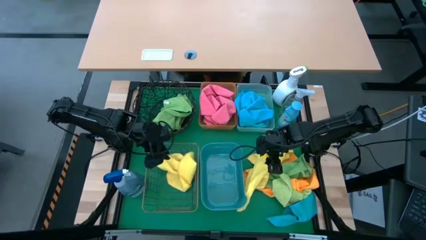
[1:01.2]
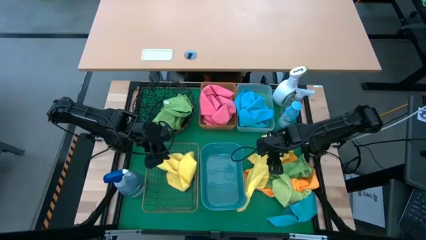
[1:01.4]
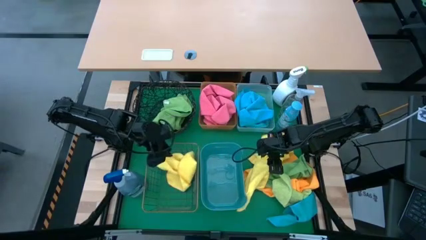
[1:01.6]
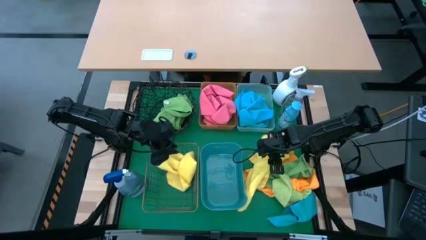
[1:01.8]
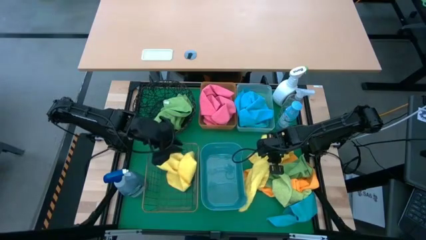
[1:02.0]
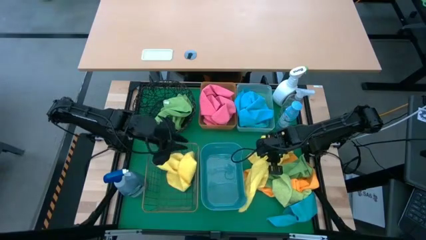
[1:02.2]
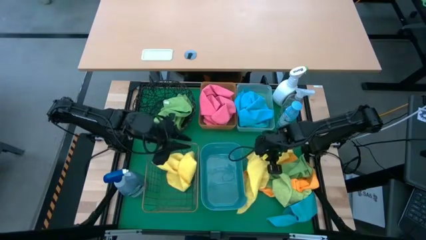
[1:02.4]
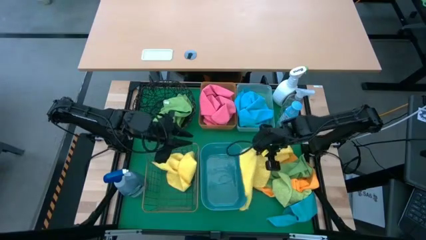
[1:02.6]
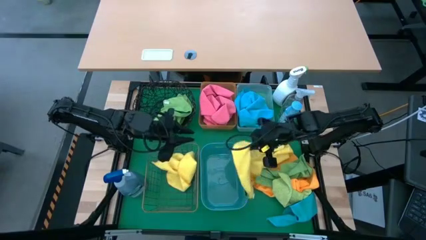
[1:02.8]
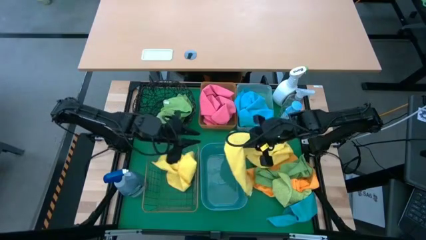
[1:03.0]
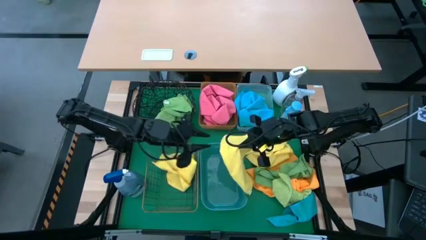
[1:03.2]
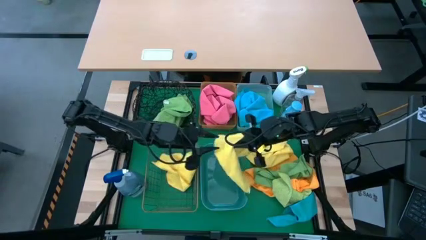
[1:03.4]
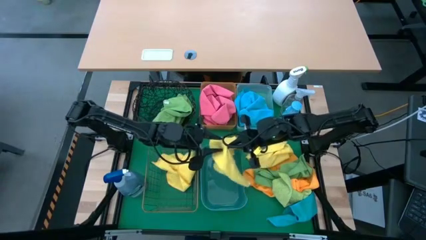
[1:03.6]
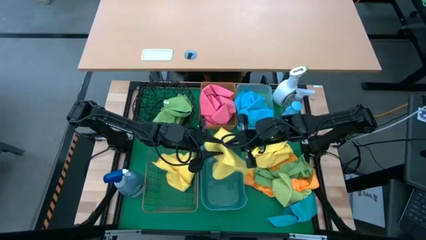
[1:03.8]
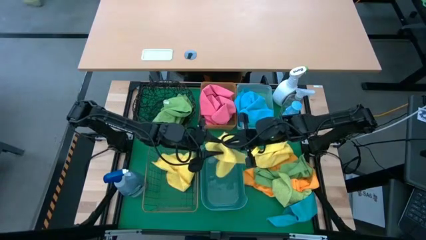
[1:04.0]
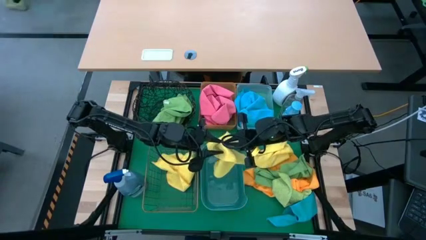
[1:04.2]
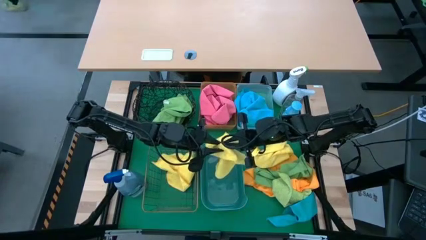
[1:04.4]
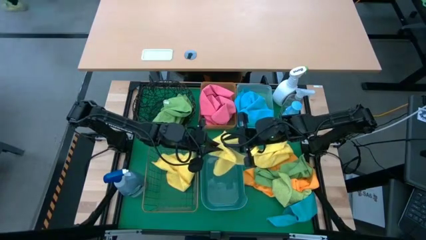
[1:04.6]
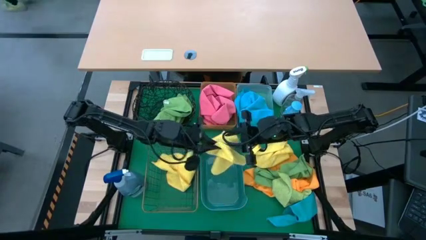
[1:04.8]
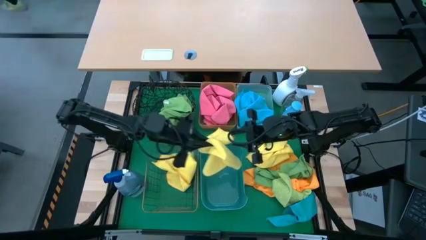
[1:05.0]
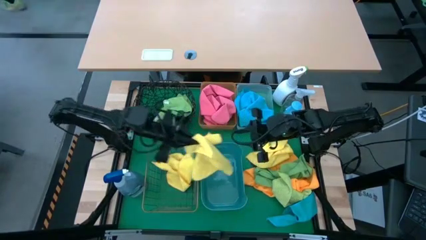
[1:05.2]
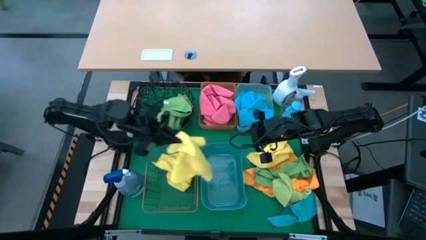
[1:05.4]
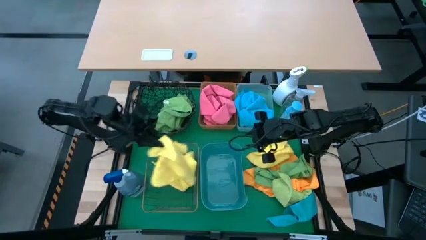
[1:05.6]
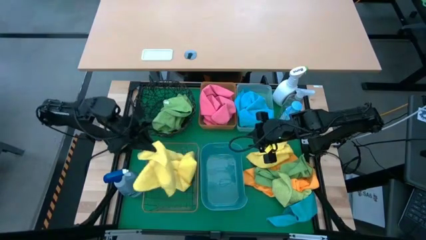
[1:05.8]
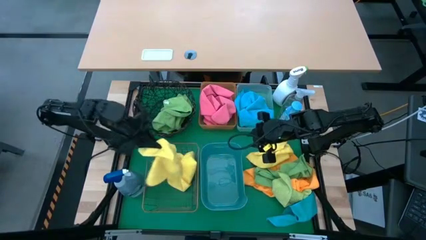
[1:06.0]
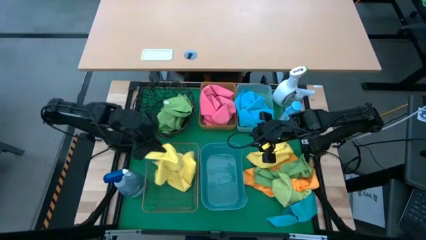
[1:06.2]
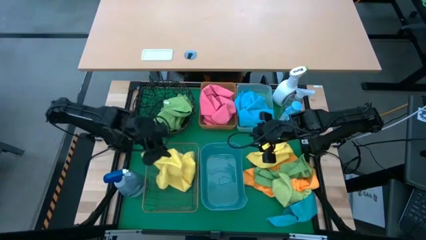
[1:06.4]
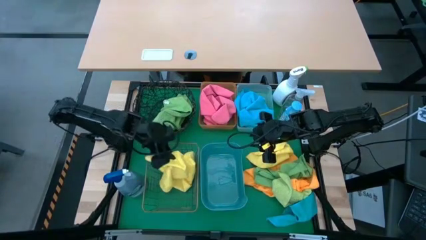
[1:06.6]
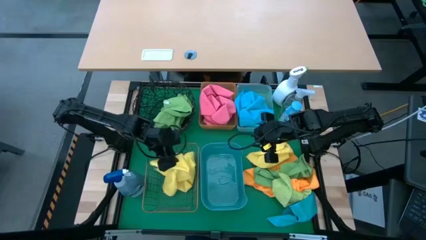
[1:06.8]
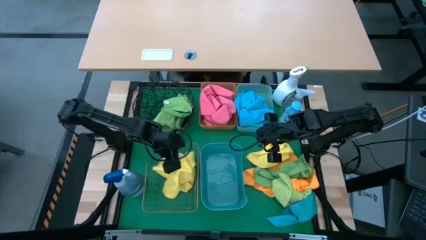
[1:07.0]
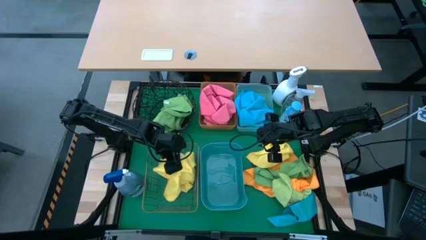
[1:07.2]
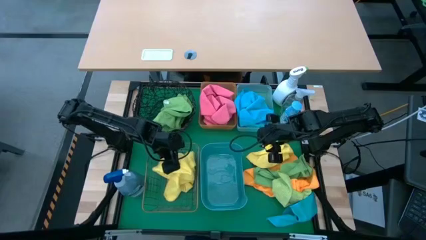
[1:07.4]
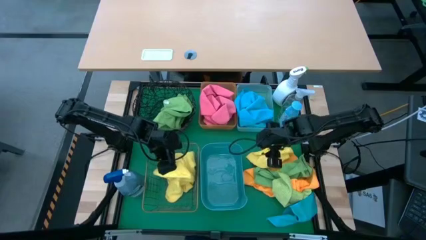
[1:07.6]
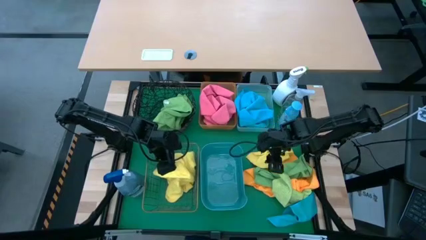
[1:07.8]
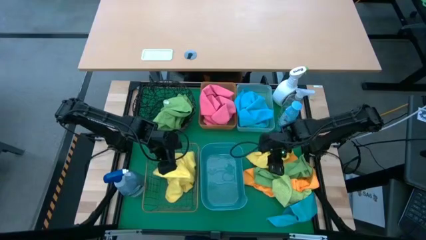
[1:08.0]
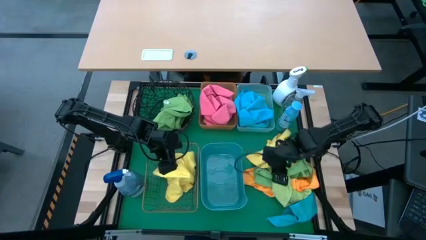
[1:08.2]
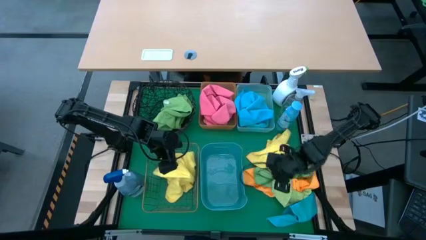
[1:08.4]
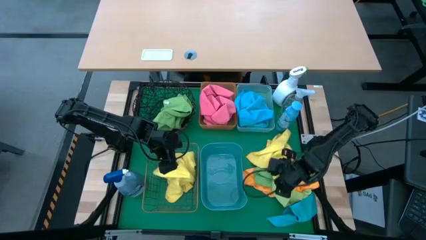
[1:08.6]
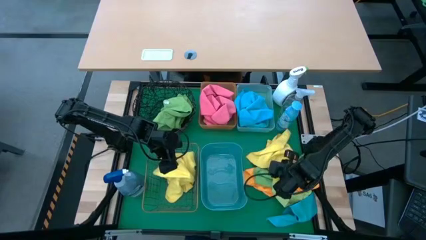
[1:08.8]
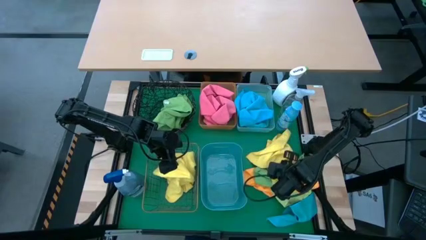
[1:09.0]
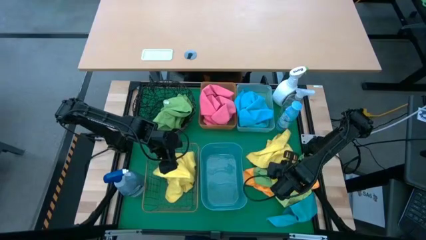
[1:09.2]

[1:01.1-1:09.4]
Task: Sort microfiber towel by color & place in baskets
Put the yellow towel into the gold wire basket

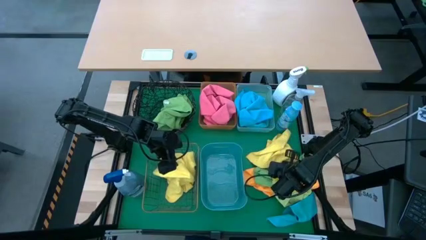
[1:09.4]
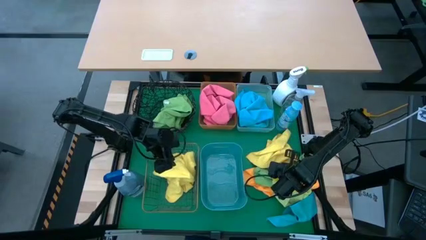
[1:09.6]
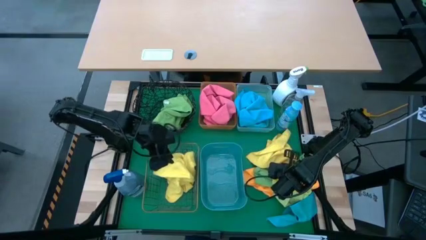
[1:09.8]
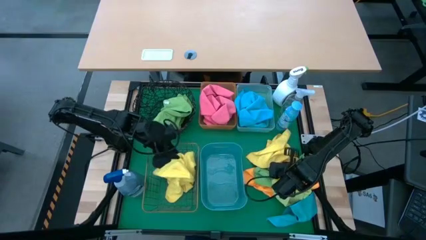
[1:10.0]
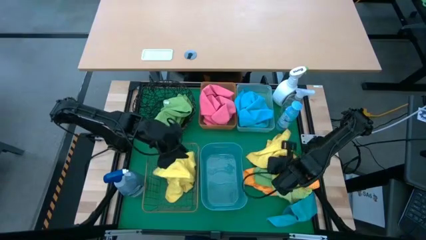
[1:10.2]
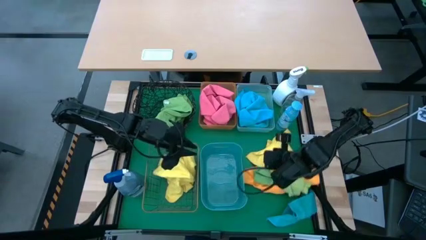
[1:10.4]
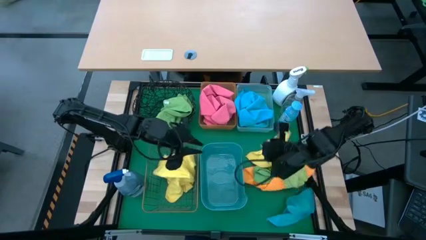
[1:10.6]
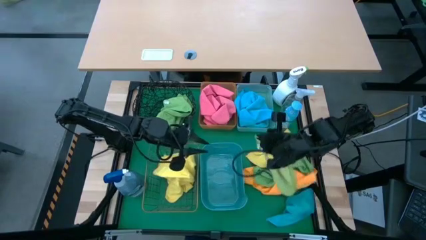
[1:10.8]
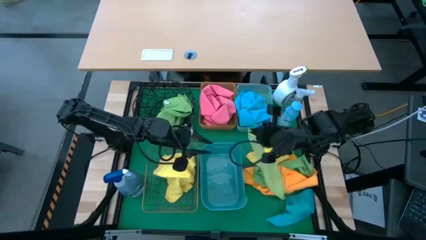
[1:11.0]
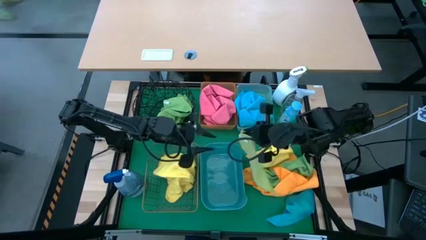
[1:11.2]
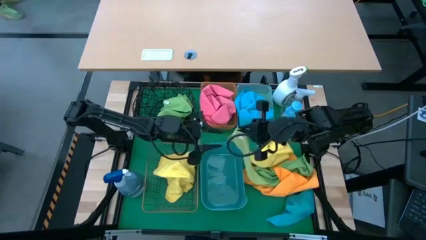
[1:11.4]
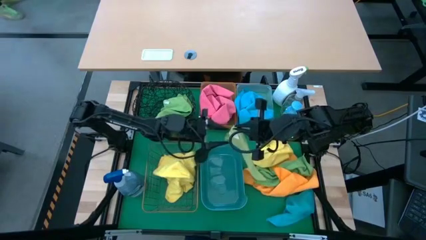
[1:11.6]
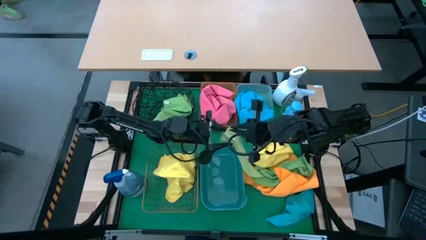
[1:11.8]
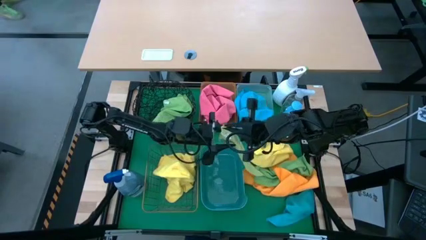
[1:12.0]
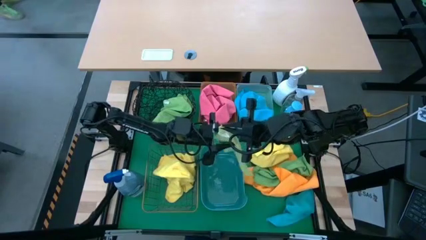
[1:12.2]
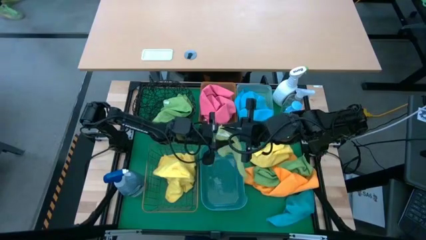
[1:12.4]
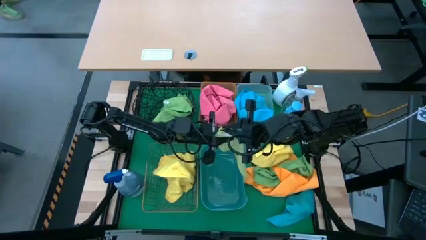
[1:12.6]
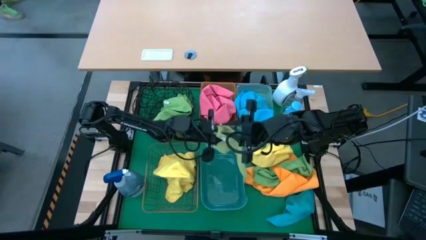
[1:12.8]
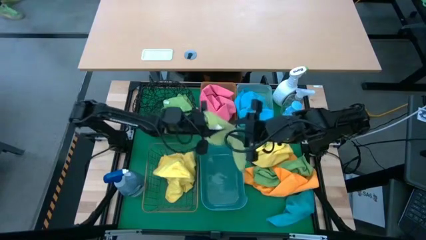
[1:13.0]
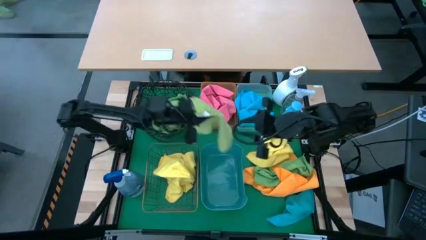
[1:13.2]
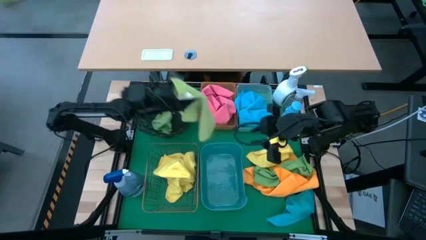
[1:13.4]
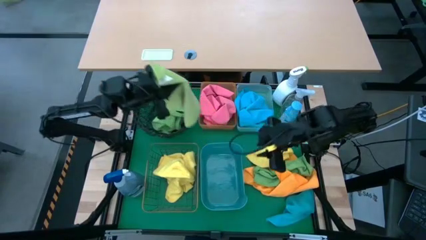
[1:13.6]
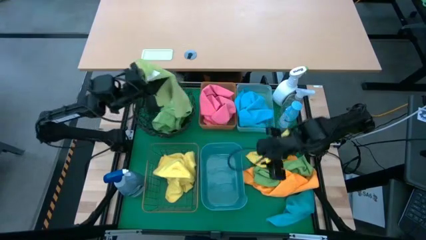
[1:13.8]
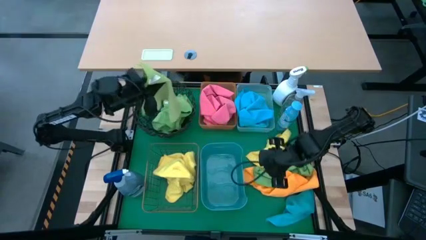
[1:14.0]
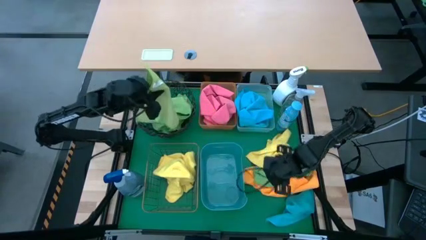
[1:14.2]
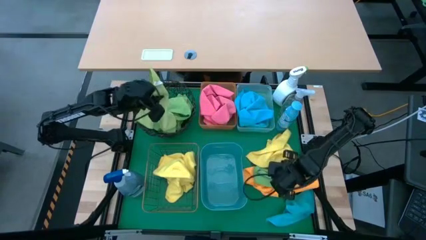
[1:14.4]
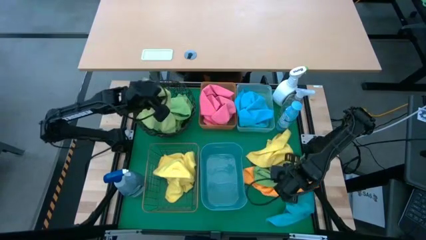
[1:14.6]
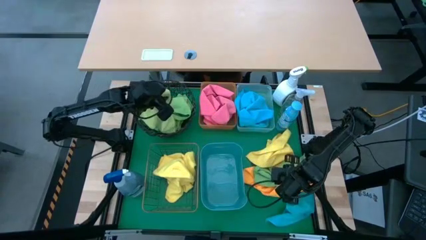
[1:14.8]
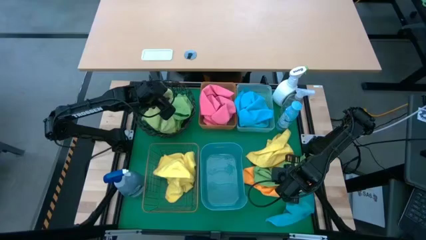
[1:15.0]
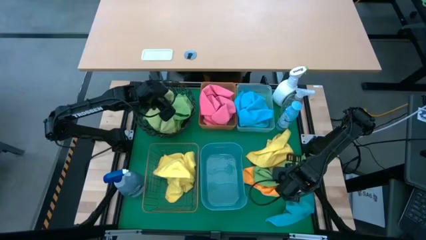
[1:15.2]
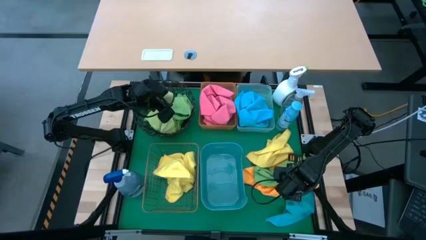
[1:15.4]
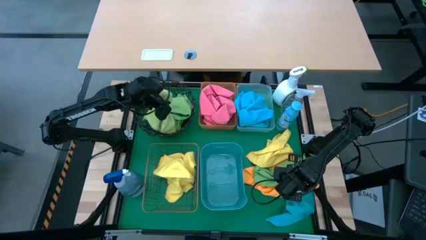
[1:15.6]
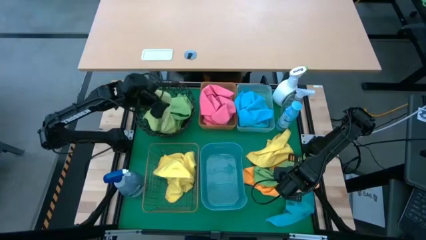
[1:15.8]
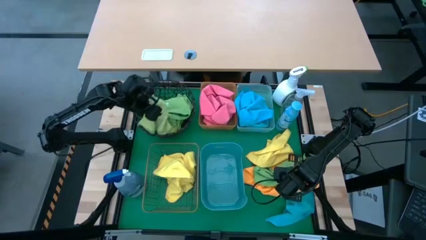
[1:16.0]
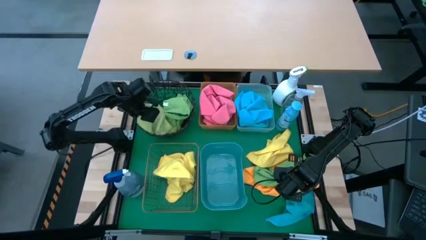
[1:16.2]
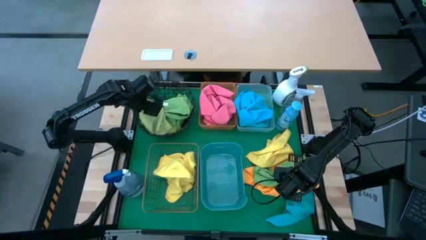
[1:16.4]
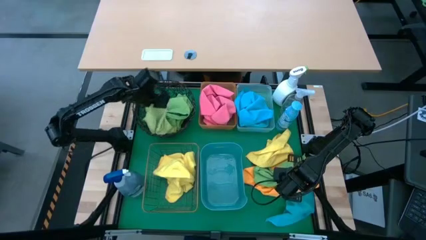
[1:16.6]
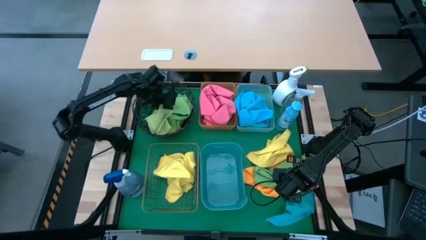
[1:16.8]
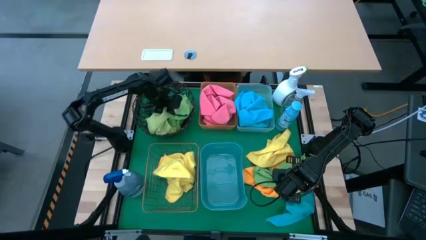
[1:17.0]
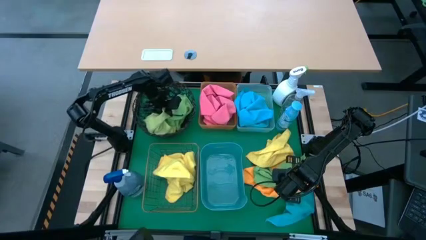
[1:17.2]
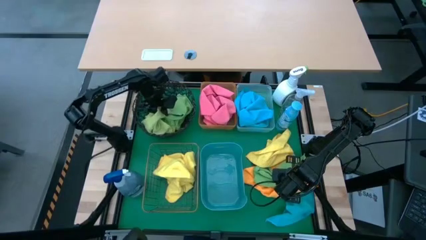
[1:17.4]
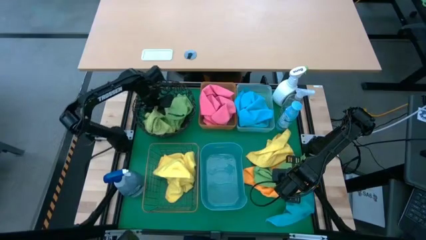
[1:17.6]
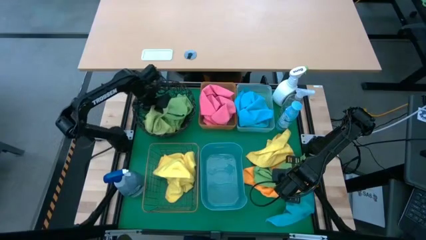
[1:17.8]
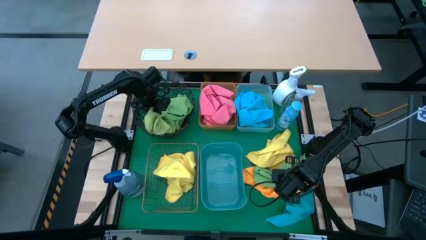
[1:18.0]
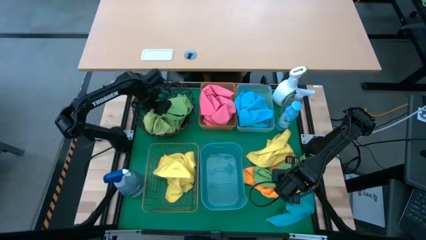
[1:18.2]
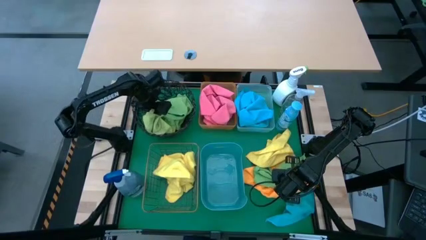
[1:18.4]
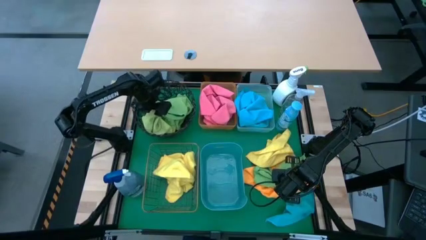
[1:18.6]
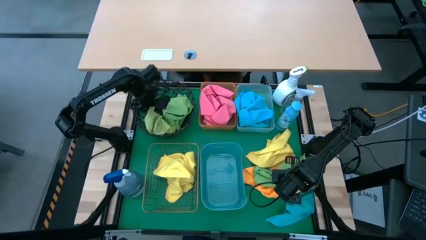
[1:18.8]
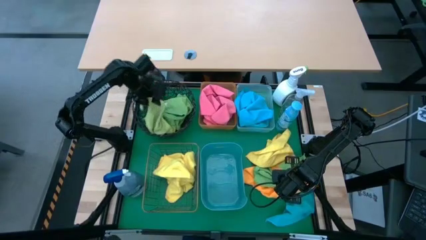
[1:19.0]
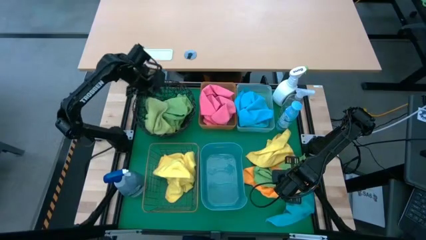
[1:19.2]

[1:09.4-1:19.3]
Put the green towel into the black basket
